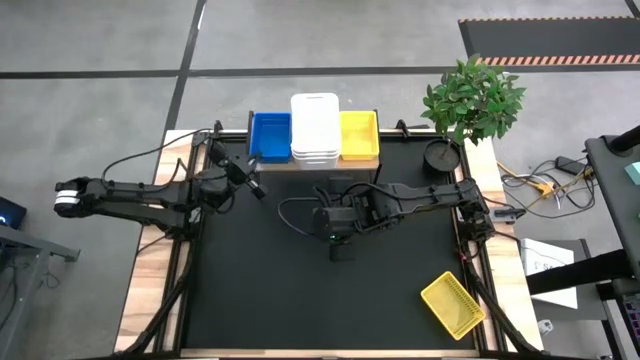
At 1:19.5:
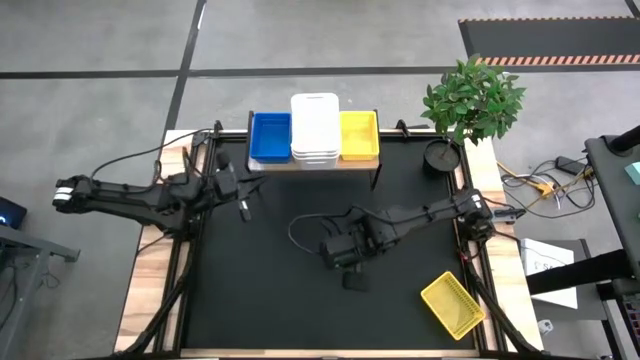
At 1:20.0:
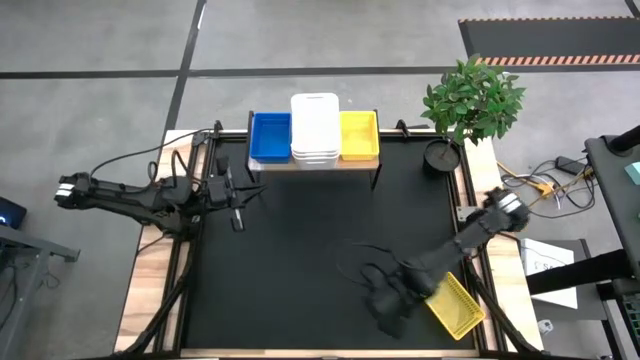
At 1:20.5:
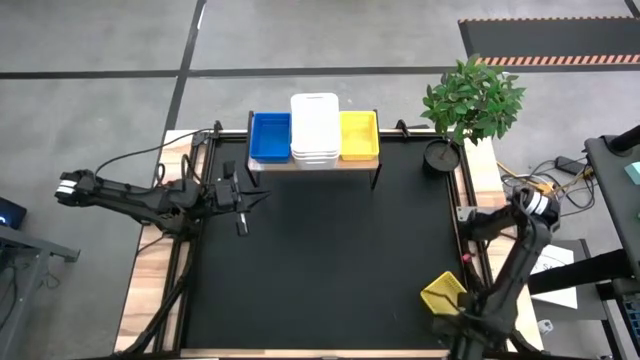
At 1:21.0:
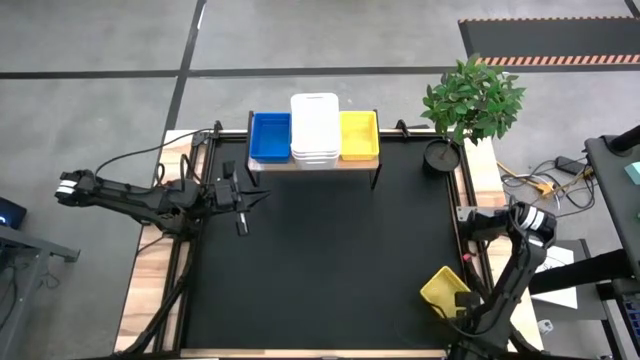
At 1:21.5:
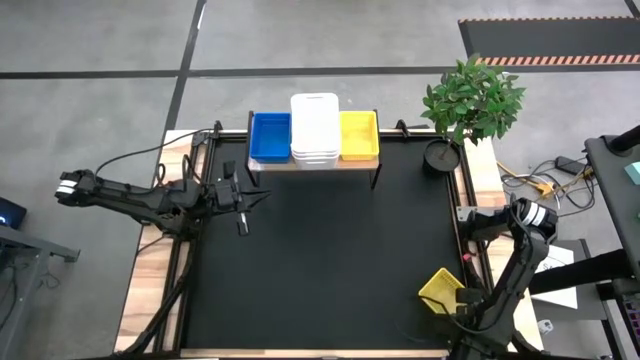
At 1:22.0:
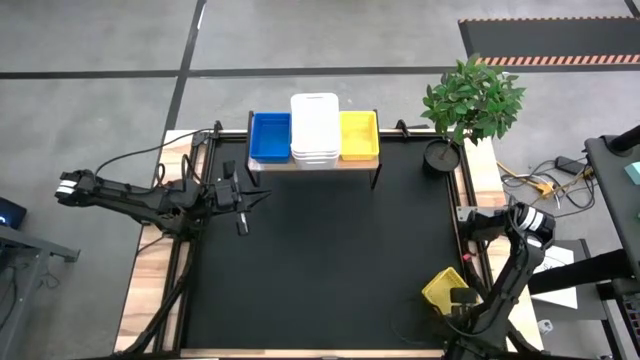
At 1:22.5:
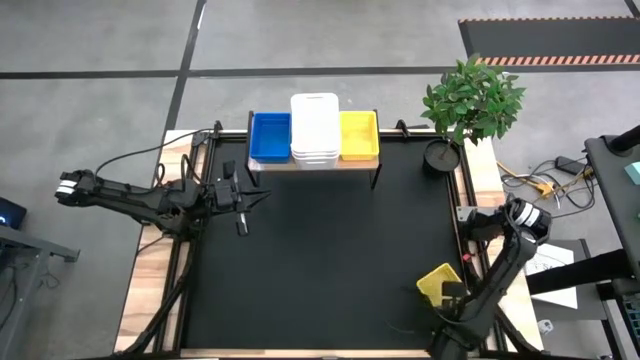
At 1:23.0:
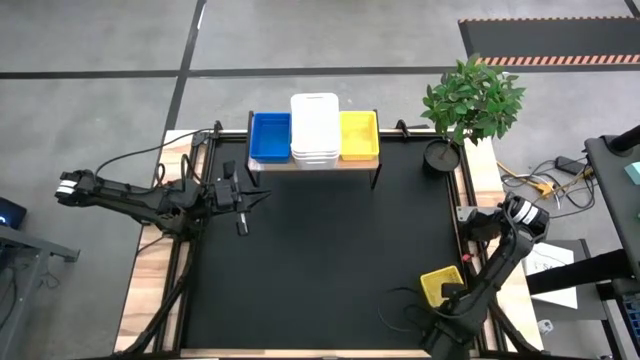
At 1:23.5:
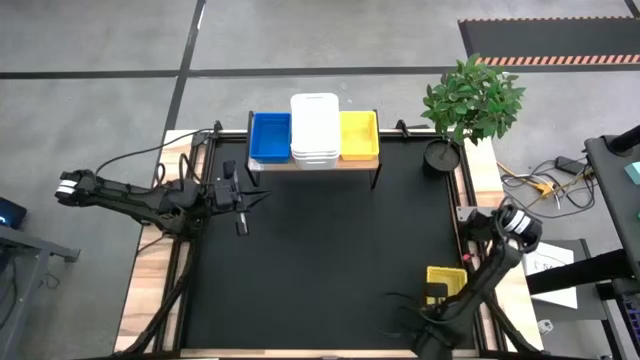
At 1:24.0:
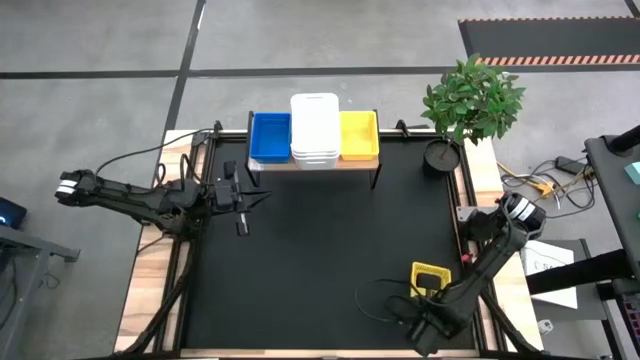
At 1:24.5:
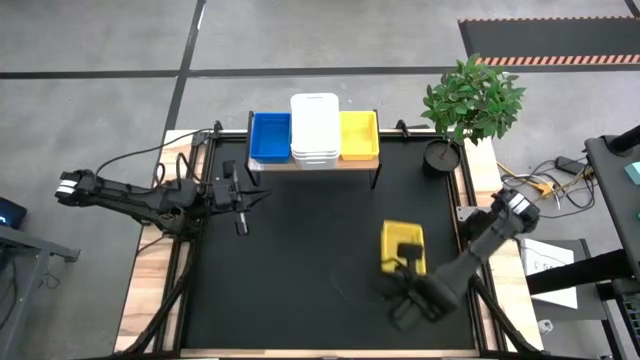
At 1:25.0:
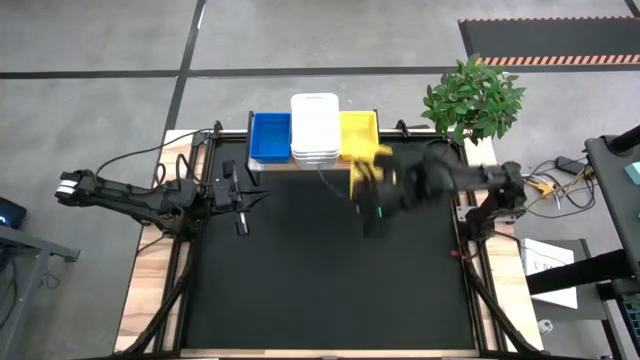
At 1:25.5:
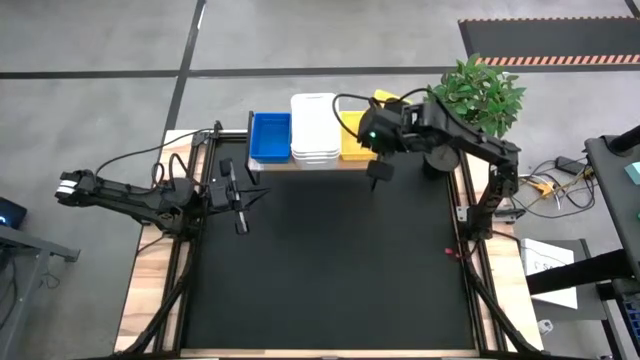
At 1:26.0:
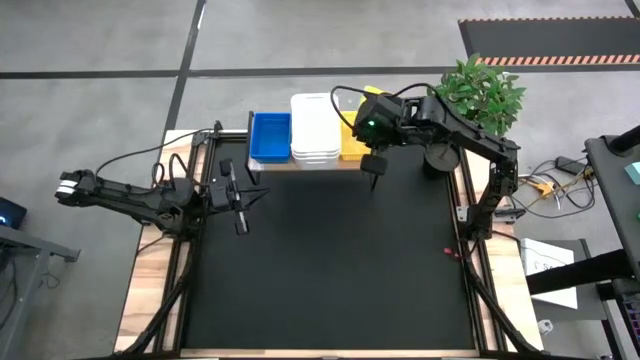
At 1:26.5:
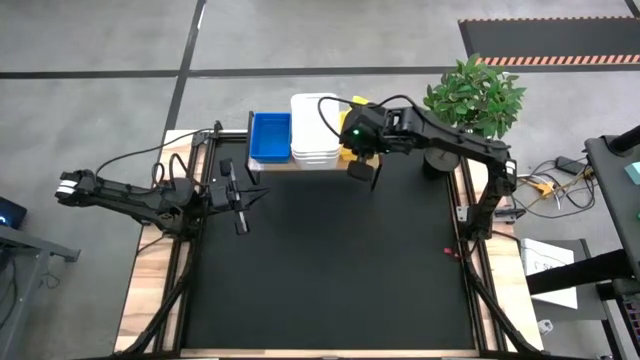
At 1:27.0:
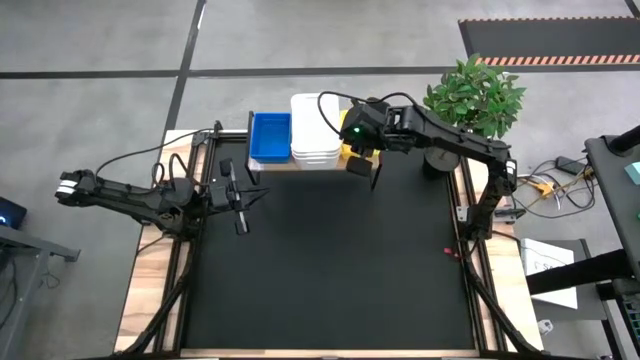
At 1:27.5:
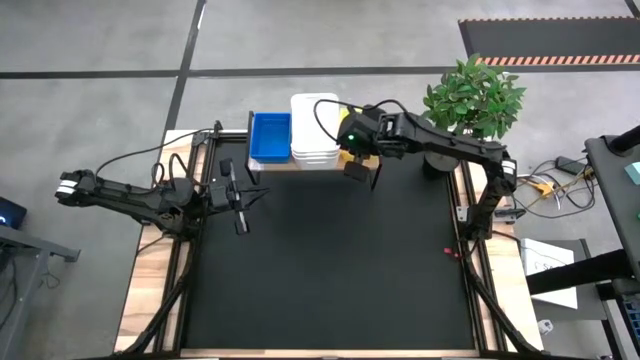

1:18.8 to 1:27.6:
Task: Stack baskets on shelf by color
Stack the yellow bin on the yellow bins on the shelf

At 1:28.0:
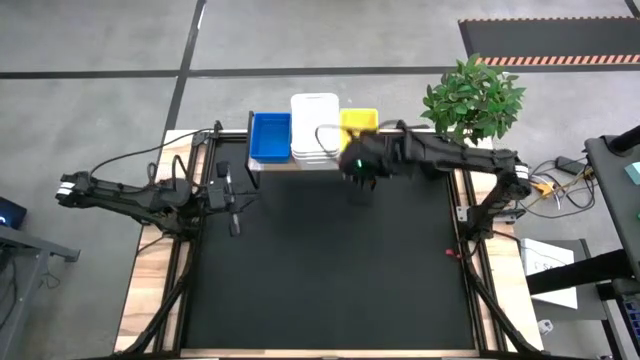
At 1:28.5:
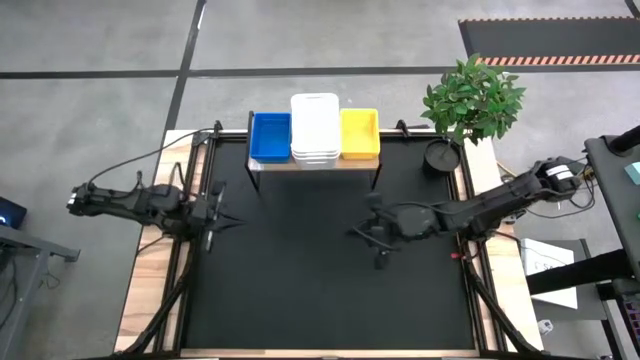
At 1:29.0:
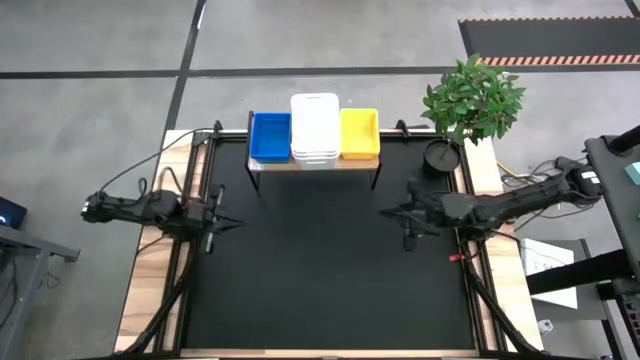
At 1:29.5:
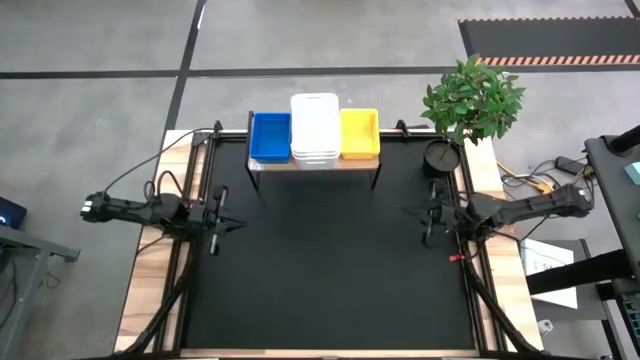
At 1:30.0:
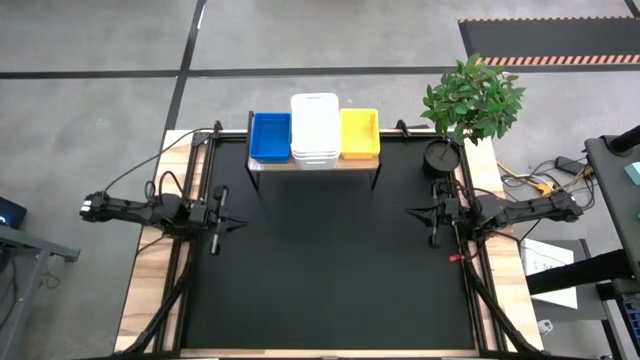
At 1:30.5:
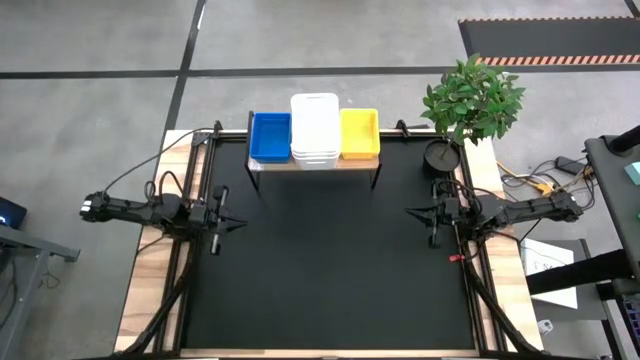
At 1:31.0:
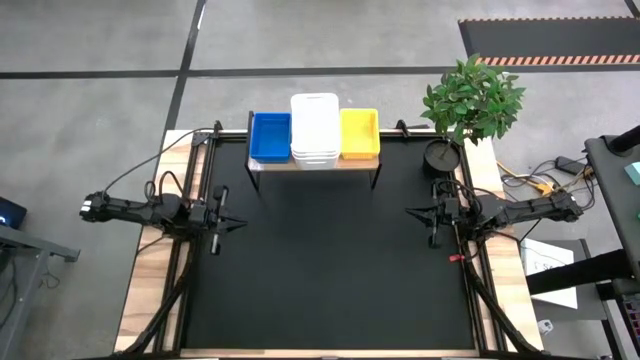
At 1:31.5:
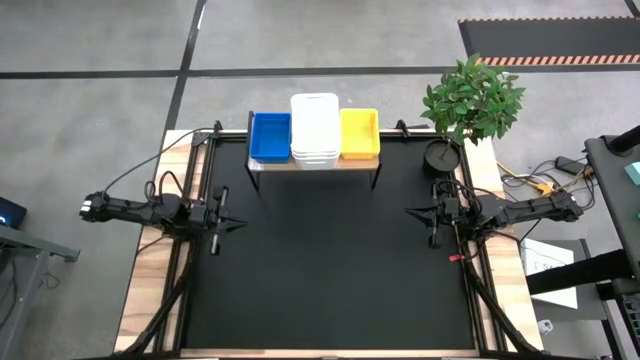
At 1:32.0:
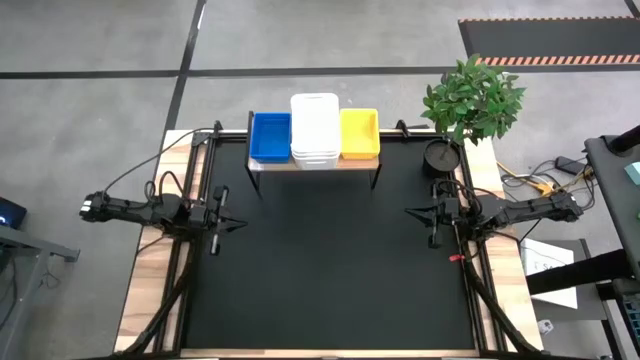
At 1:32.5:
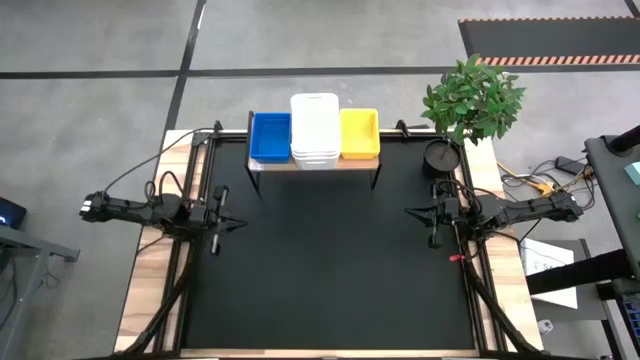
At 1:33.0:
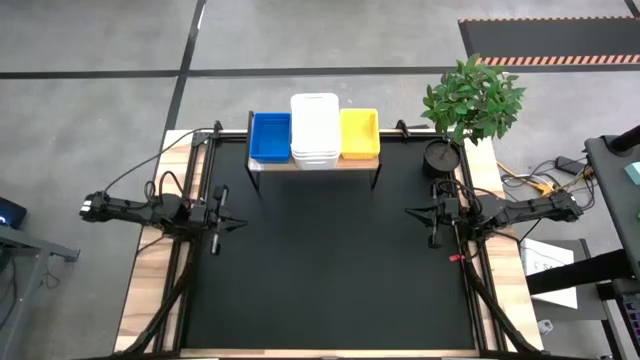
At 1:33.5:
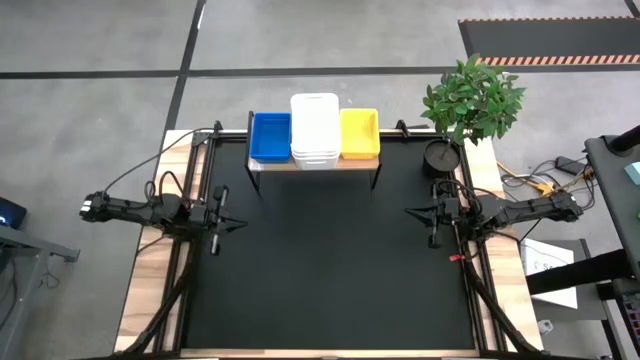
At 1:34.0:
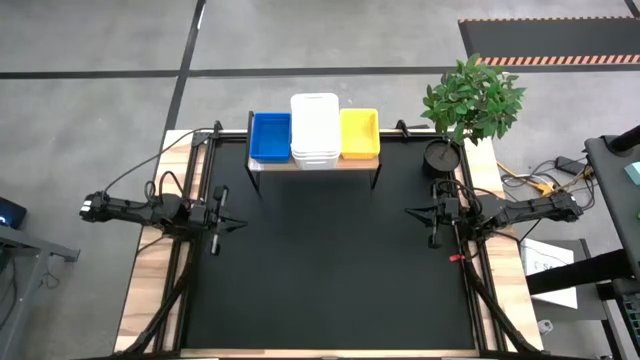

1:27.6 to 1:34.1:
Return to Home Position

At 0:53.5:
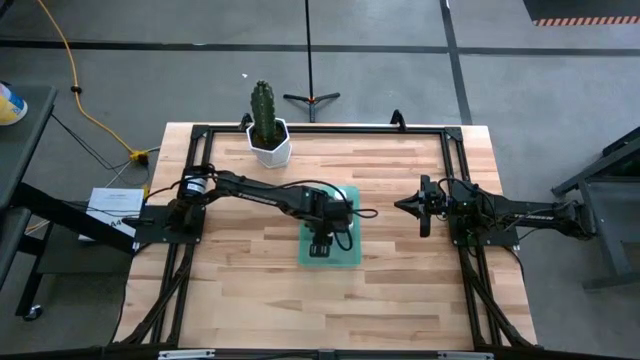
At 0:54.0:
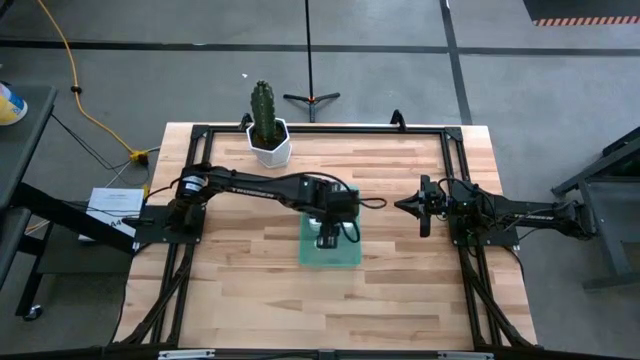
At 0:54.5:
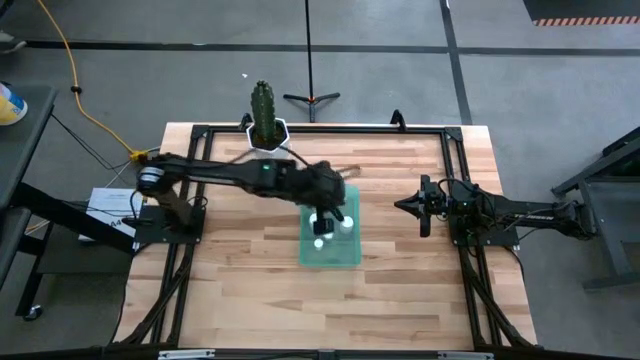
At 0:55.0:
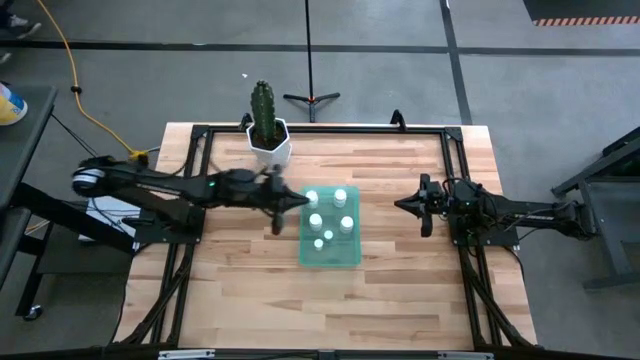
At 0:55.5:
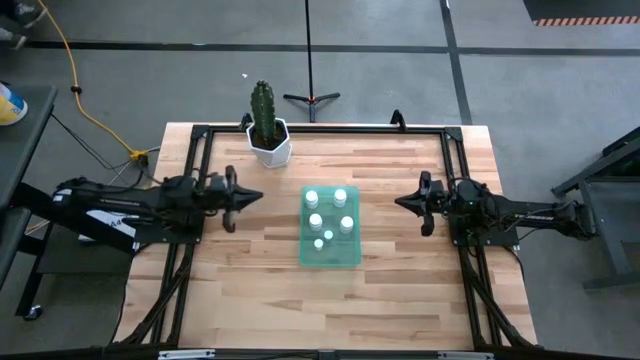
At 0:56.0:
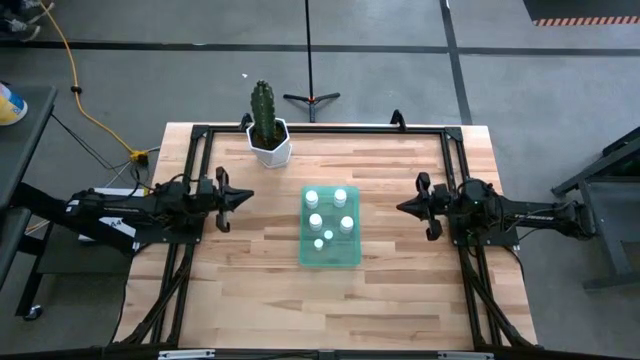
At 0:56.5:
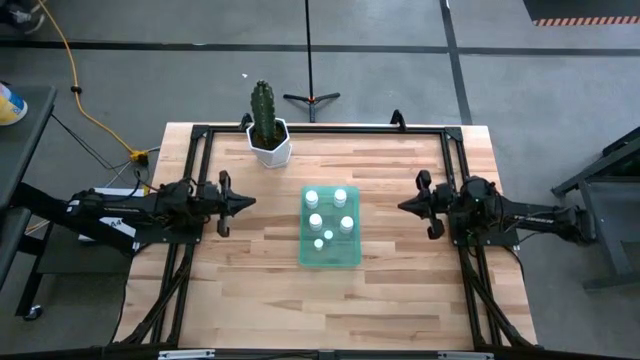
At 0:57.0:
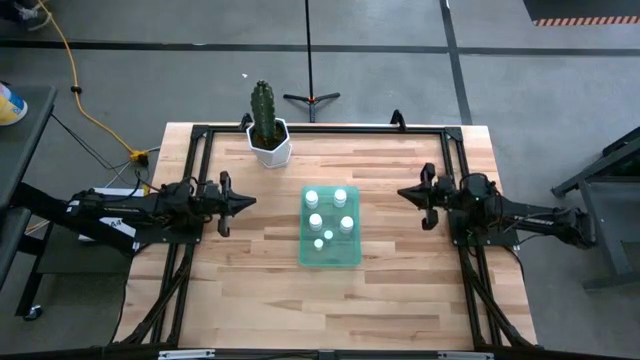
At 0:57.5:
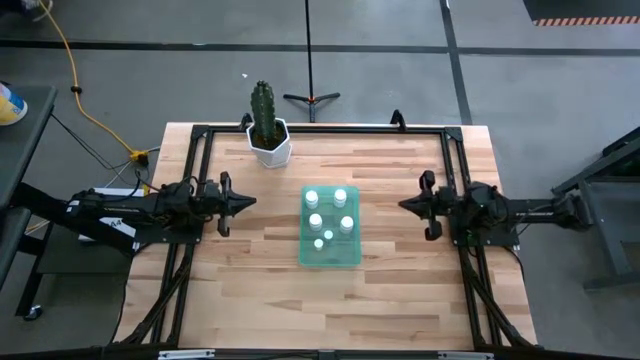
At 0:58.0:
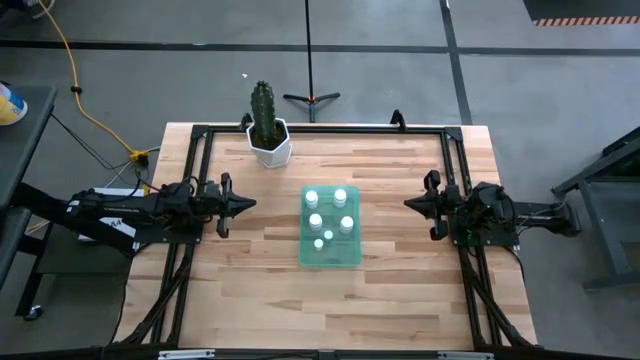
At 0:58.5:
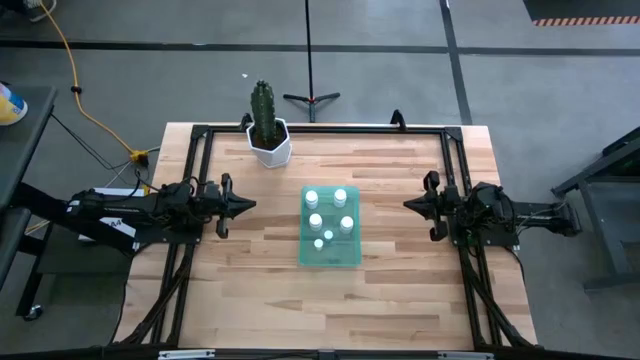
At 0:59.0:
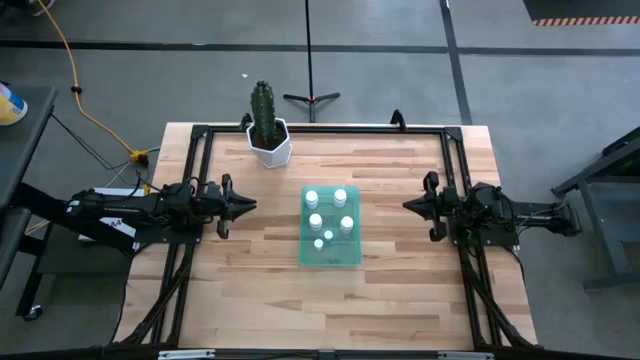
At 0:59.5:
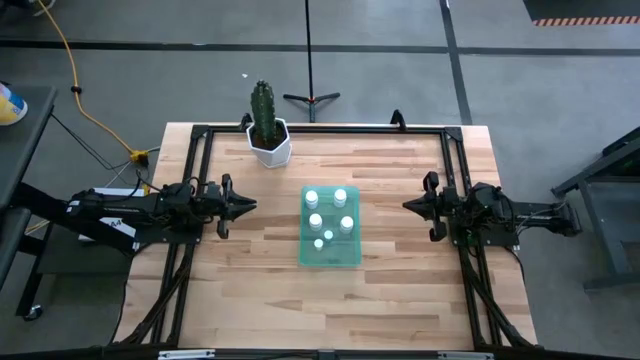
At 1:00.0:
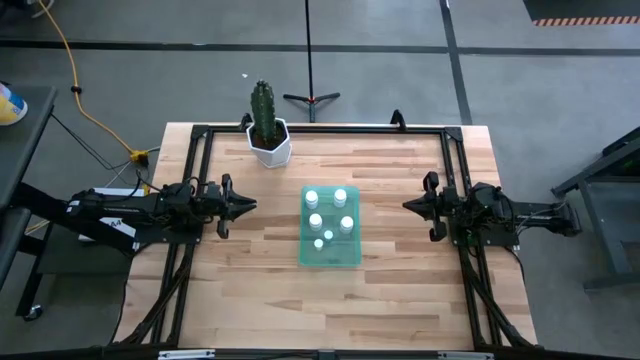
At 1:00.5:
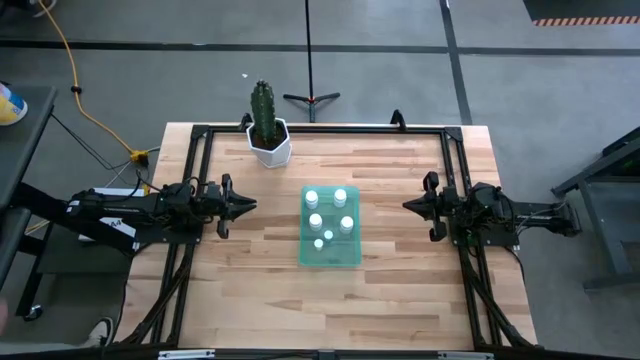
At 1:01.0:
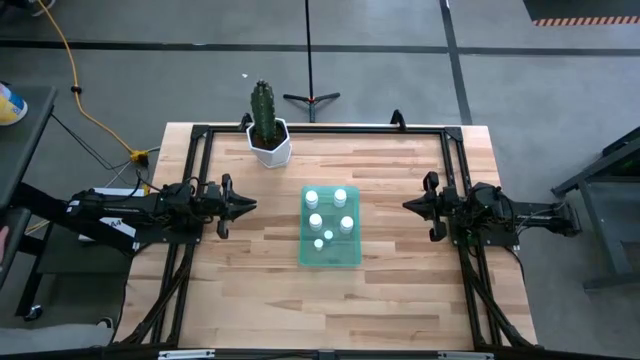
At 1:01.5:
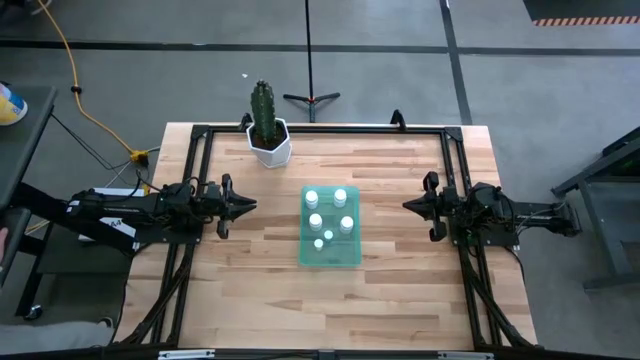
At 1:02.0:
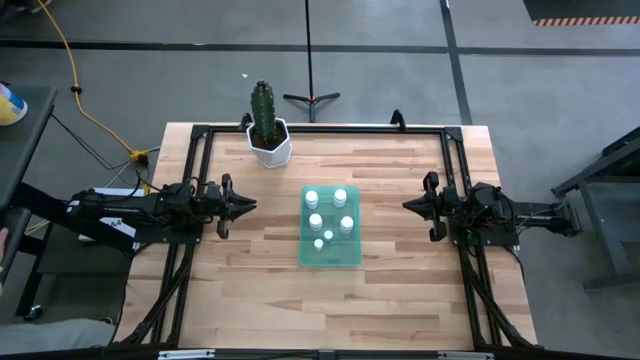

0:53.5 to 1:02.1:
Task: Pick and place pill bottles into a basket
Return to Home Position
